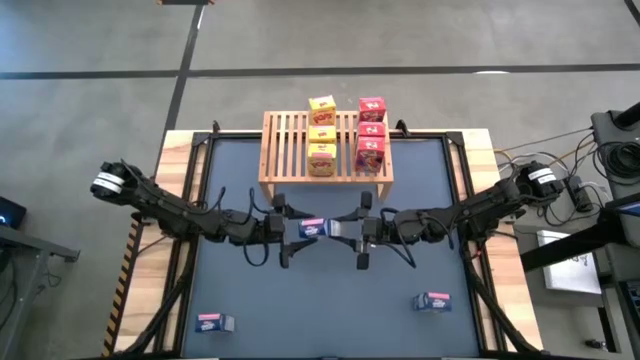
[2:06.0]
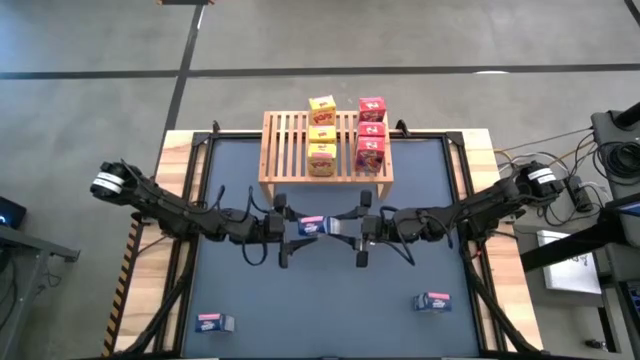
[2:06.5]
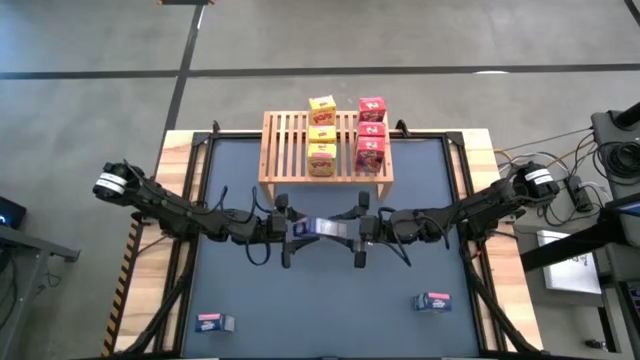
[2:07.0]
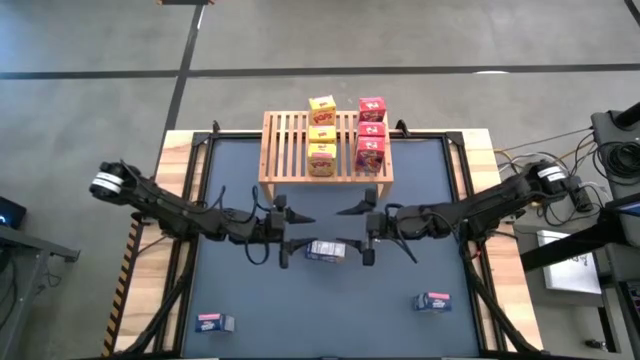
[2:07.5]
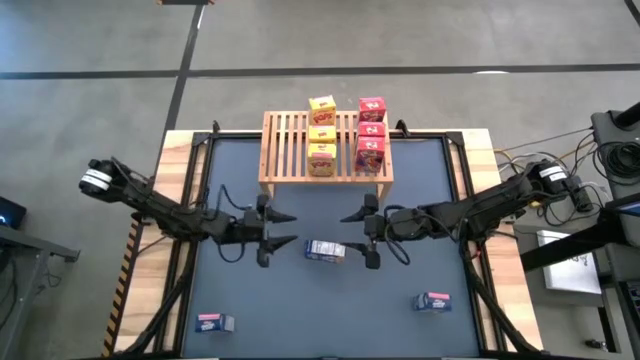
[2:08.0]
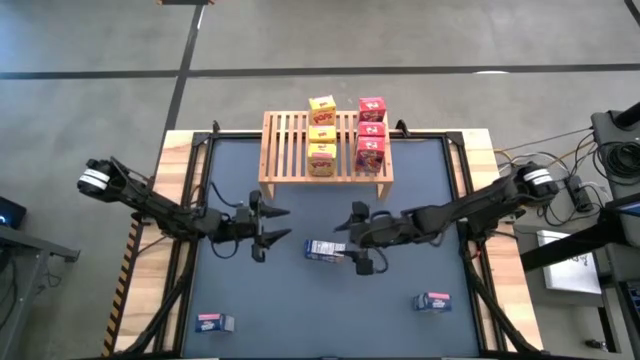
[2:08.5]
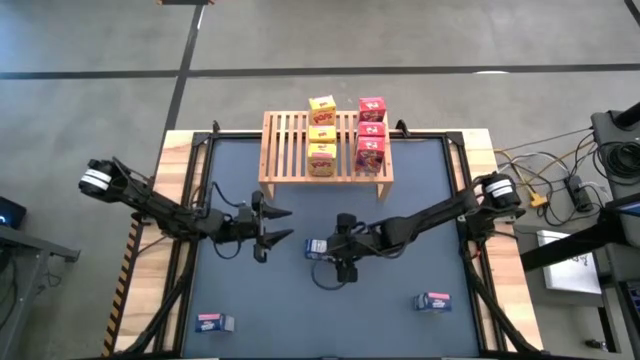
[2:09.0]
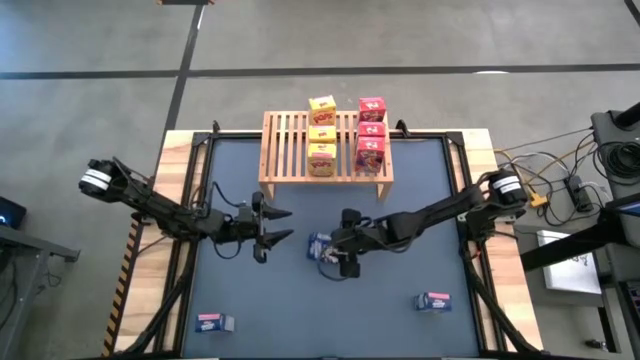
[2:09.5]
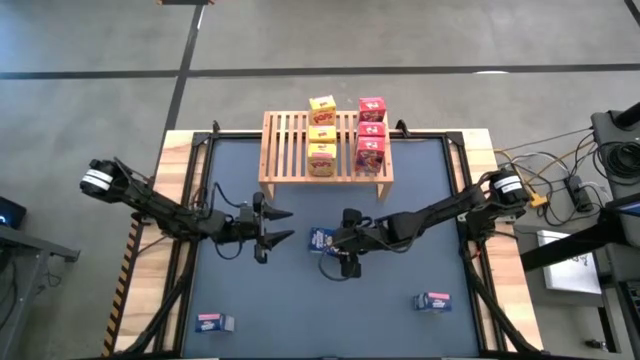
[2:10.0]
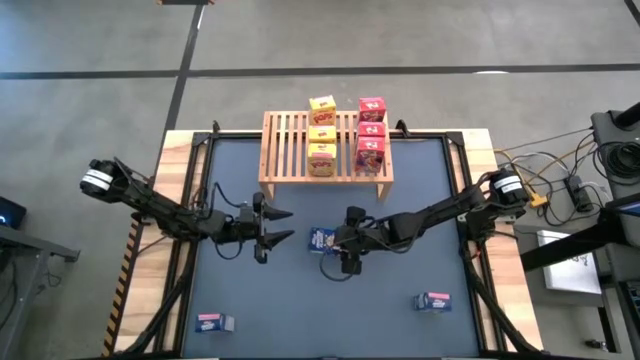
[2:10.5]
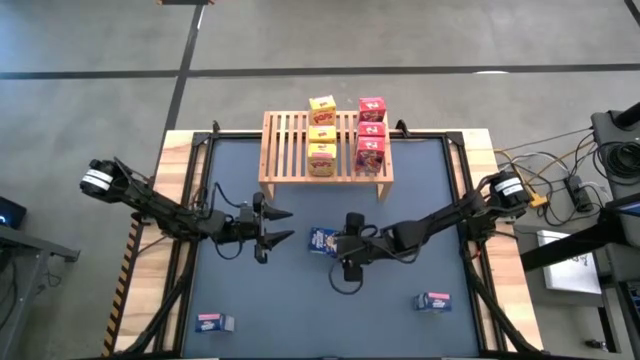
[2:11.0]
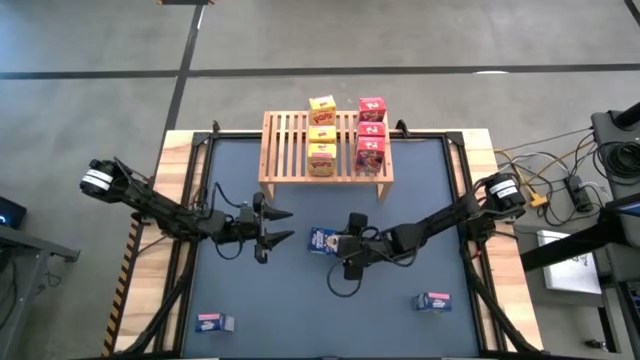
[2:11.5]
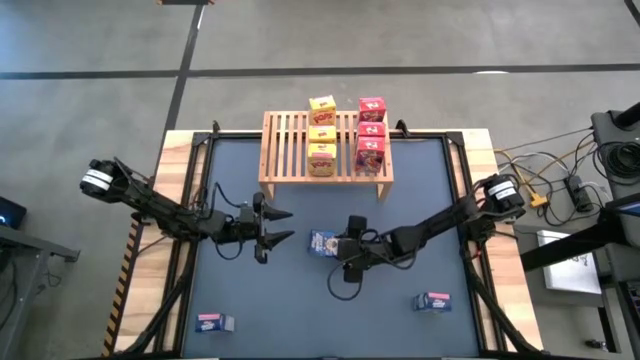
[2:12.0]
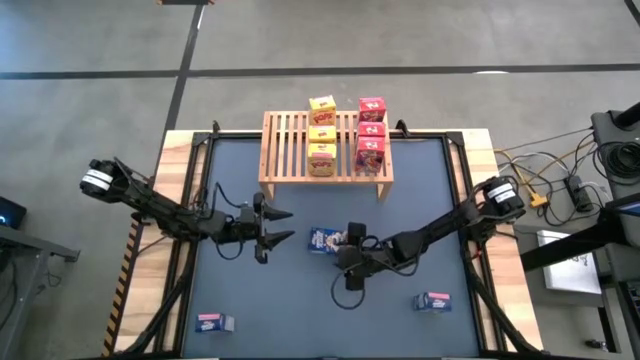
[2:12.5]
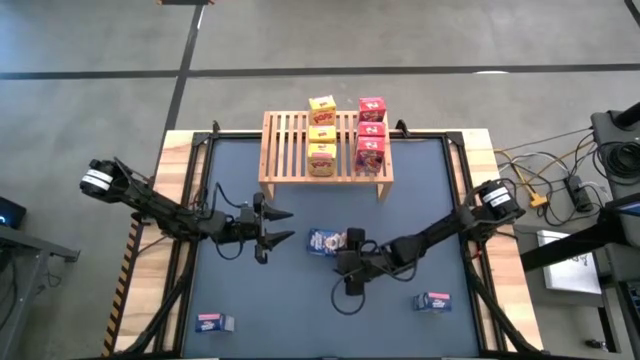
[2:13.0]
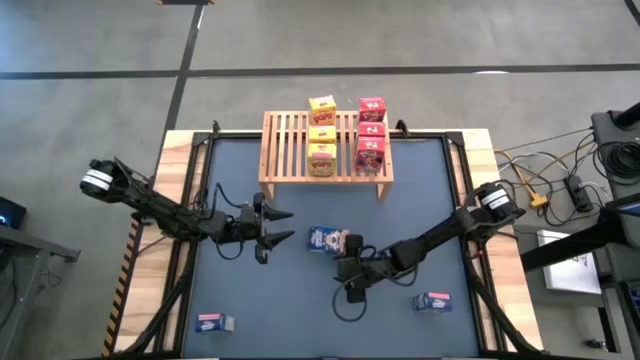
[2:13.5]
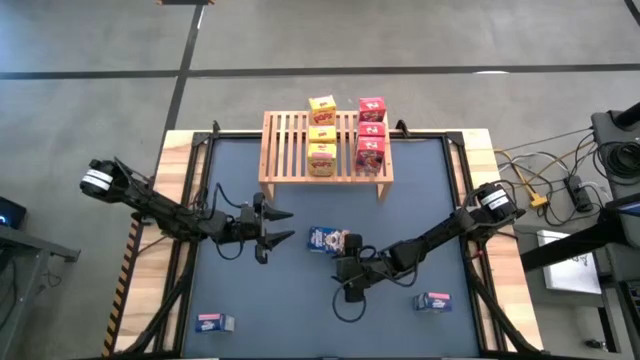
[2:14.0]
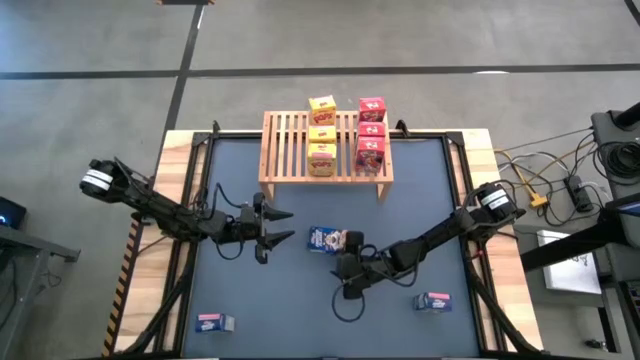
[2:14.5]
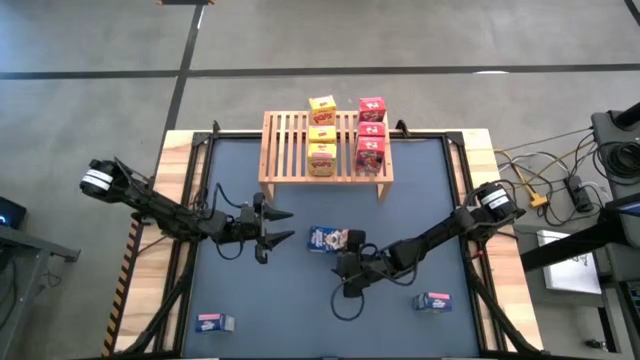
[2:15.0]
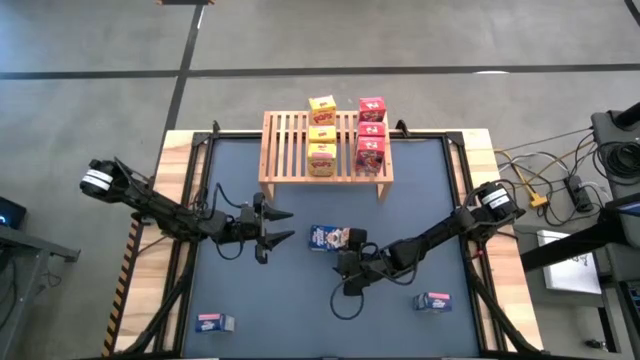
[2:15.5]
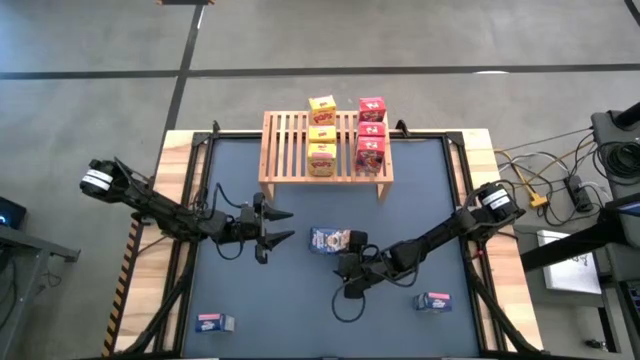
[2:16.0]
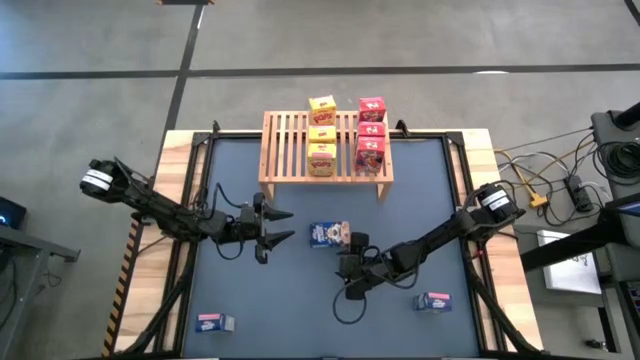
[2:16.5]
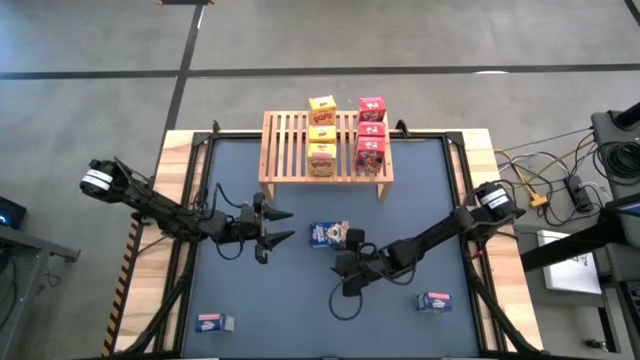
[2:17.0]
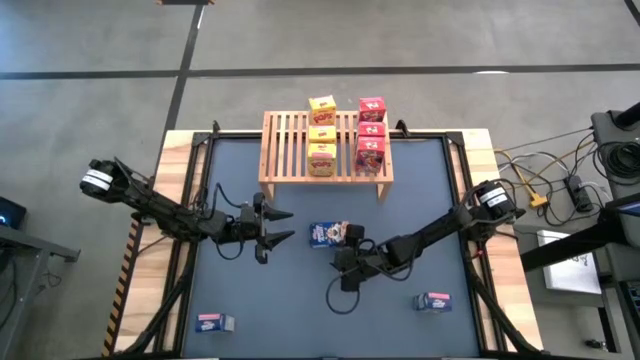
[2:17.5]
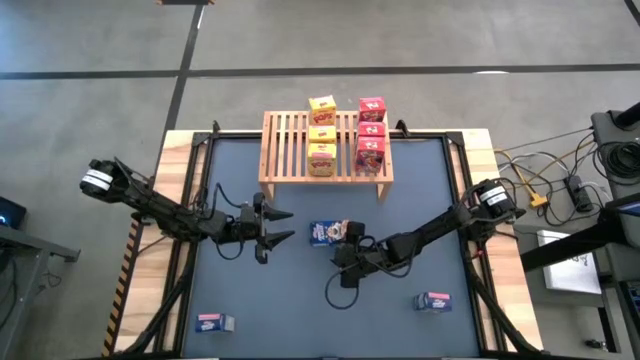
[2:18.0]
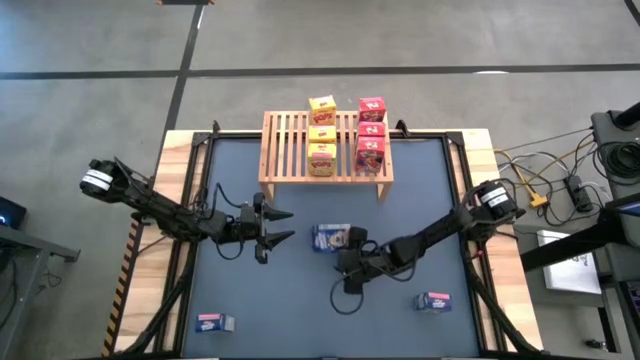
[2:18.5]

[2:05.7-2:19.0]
Task: Stack cereal on shelf
Put the top blue cereal box on the shelf

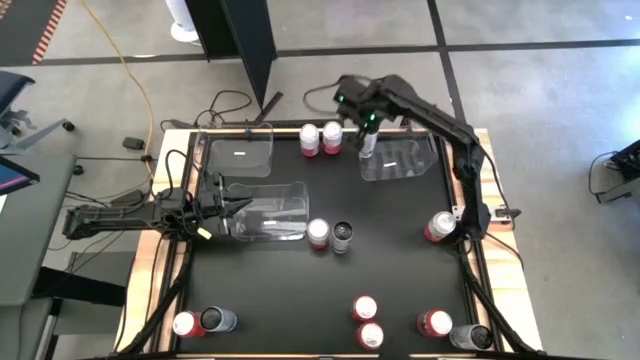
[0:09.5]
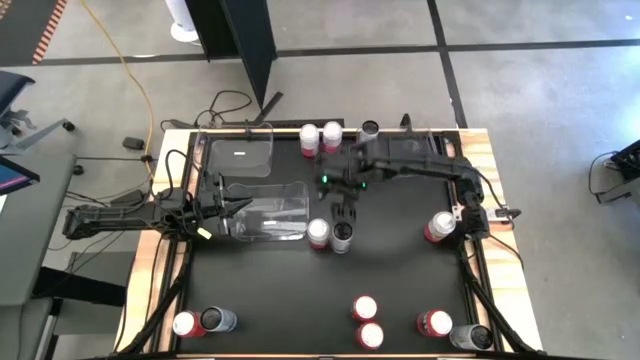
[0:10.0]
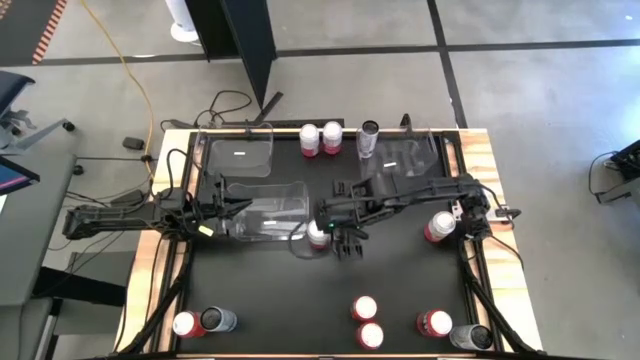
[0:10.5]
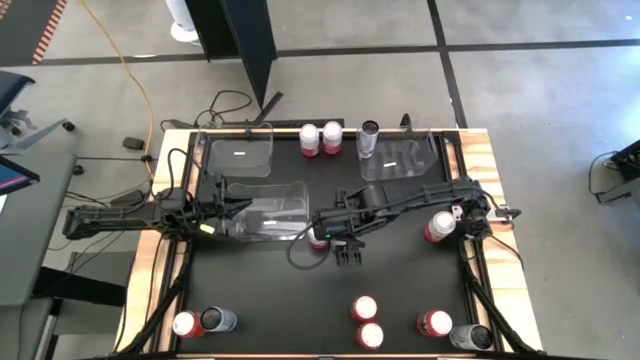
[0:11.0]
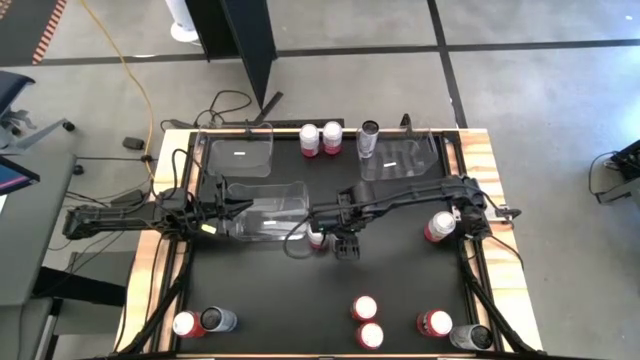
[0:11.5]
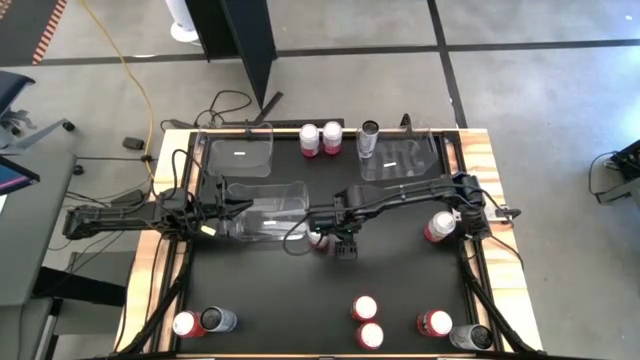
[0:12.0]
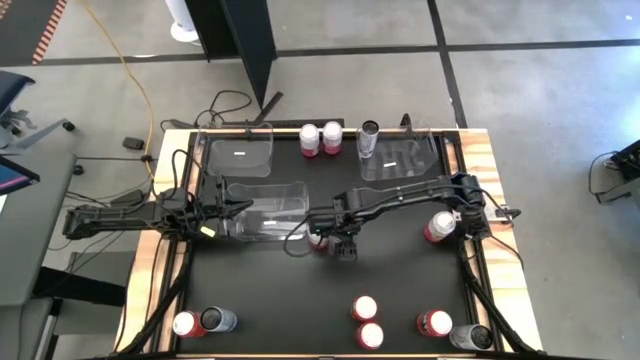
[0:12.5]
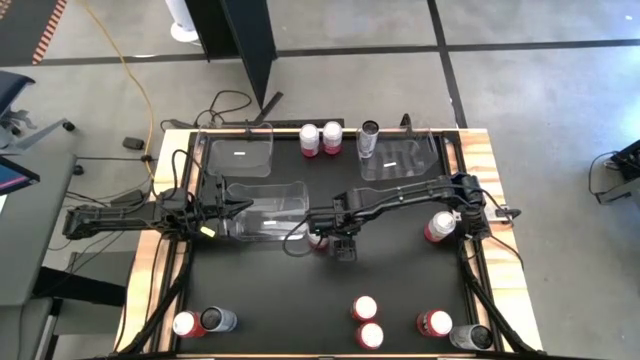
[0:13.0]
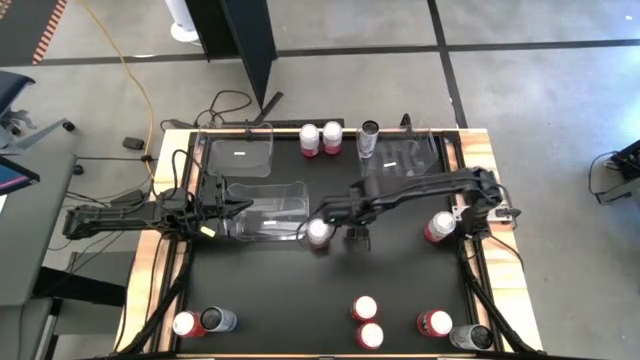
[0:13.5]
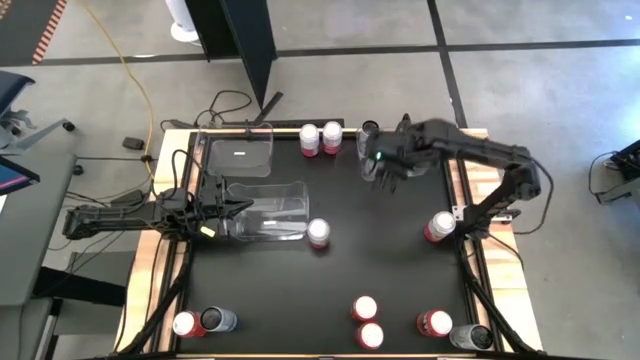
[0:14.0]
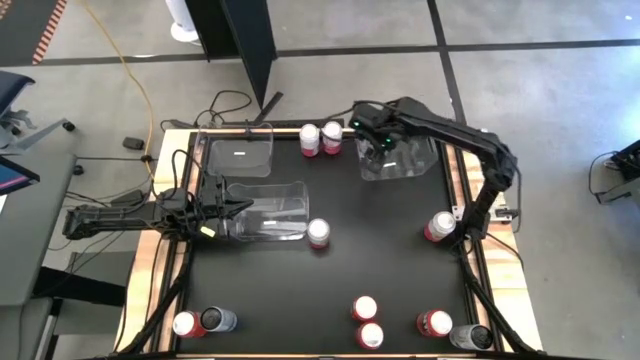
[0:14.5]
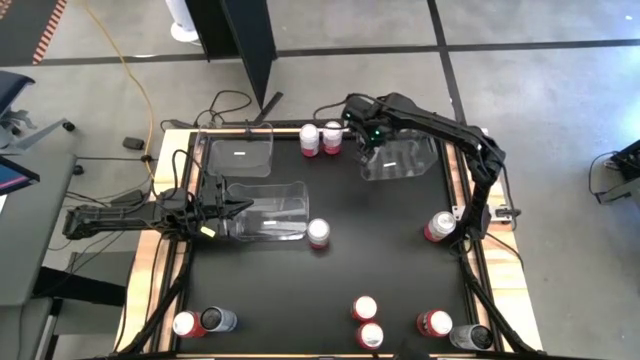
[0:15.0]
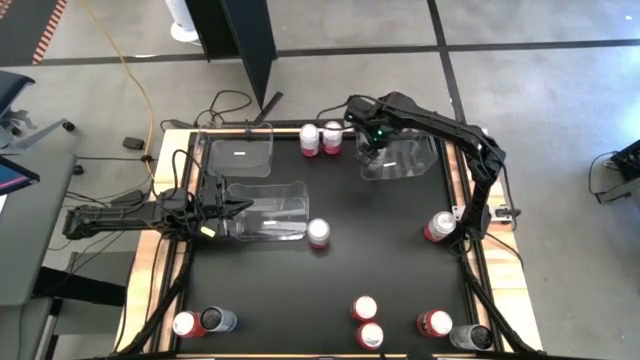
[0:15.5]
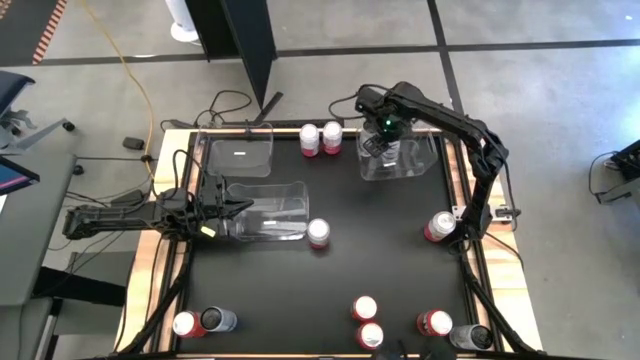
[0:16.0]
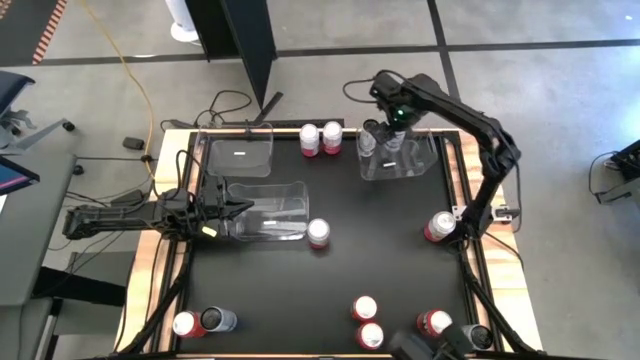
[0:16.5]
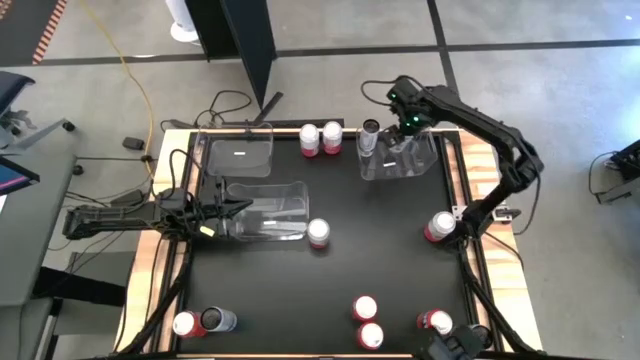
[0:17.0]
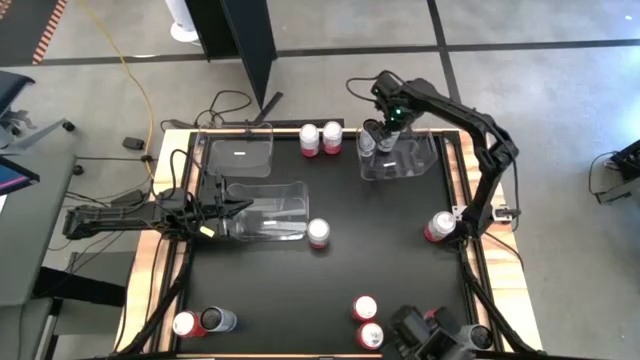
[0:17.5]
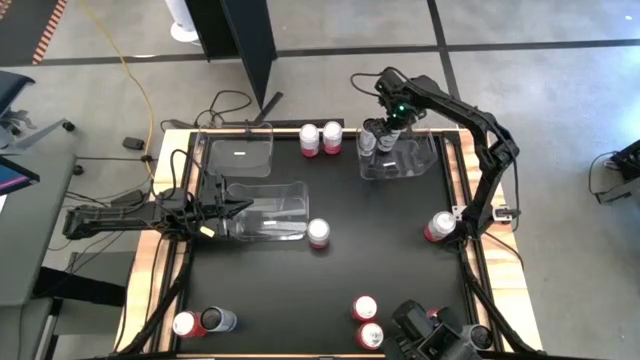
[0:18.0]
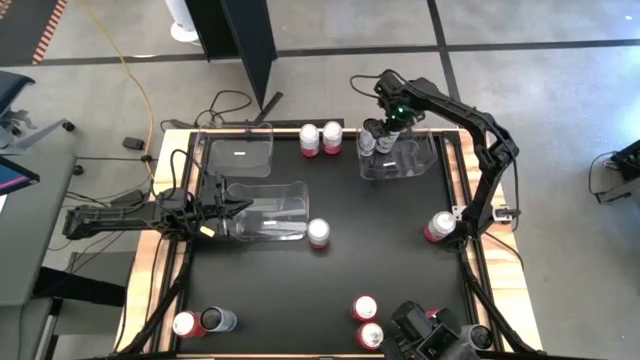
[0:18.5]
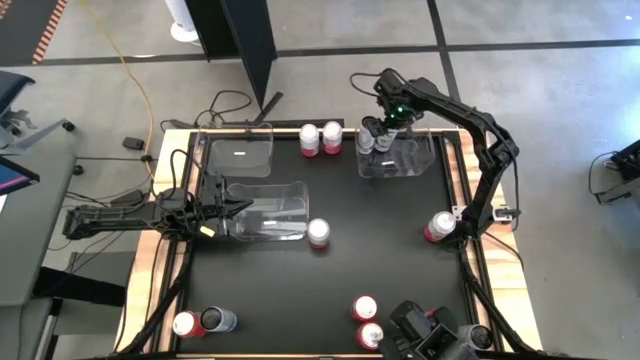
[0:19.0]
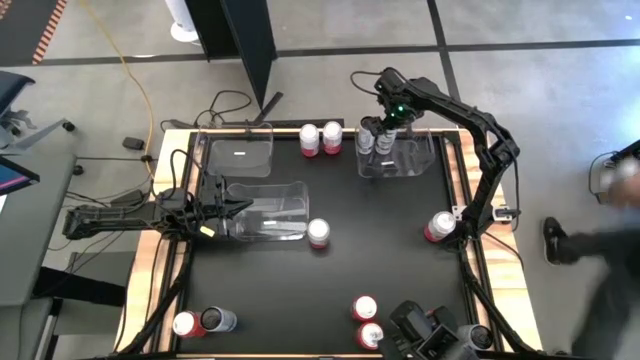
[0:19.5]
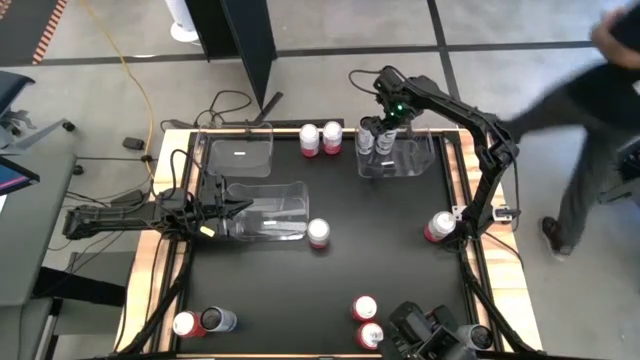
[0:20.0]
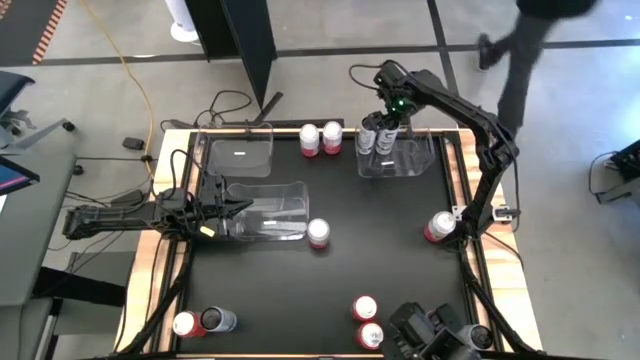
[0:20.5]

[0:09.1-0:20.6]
Task: Sort soda cans
Put the top white-blue soda can into the top right transparent bin
